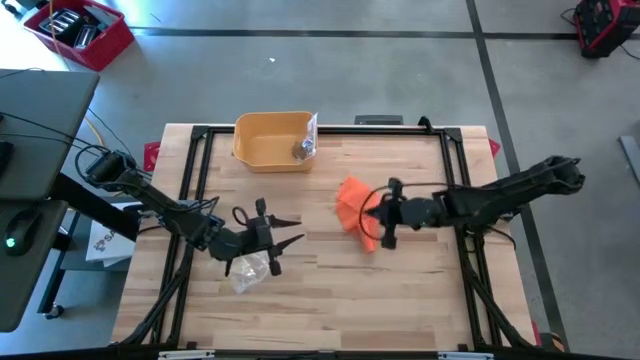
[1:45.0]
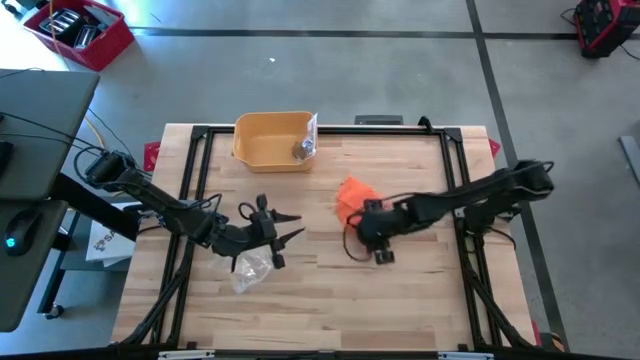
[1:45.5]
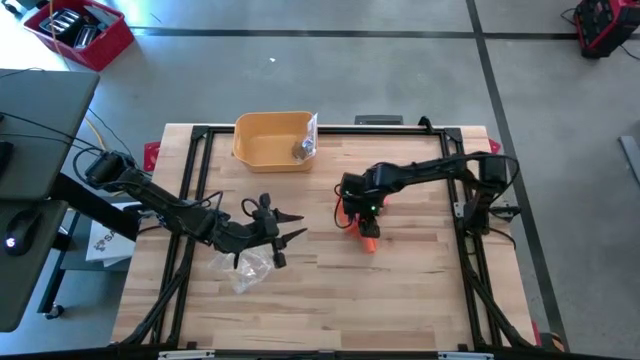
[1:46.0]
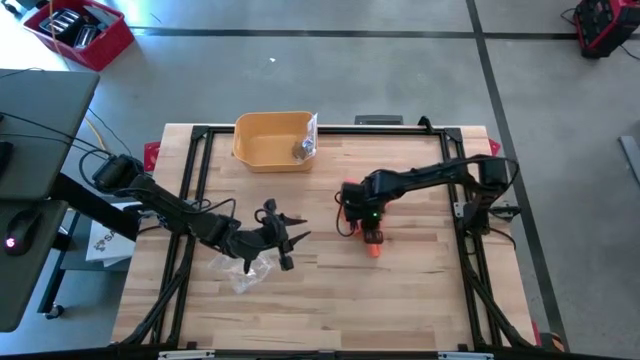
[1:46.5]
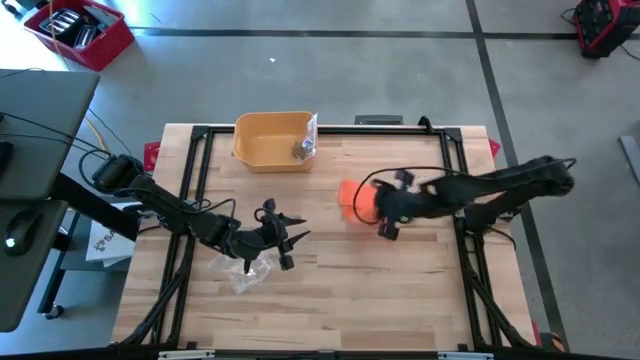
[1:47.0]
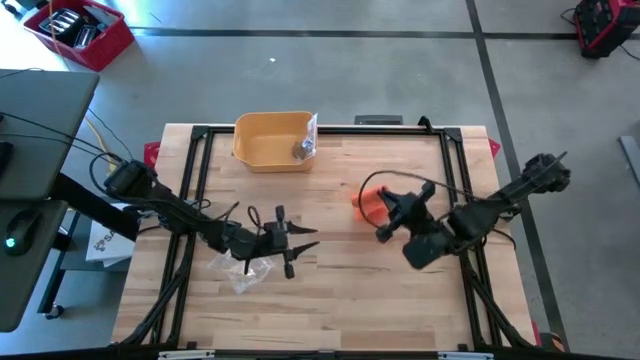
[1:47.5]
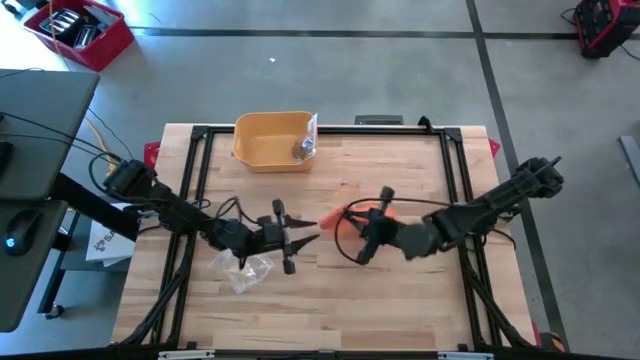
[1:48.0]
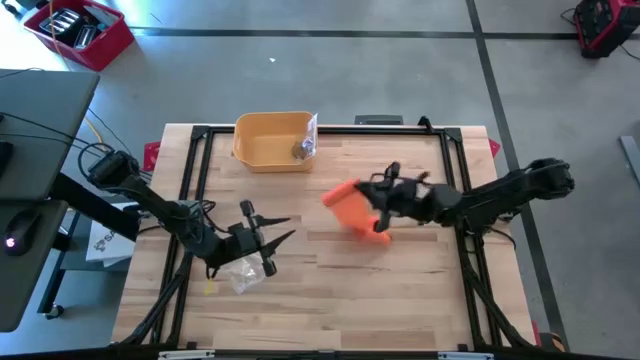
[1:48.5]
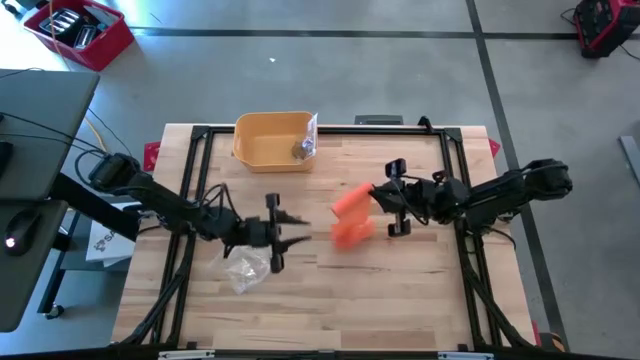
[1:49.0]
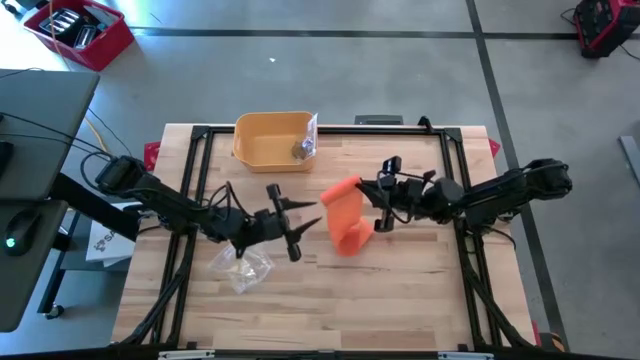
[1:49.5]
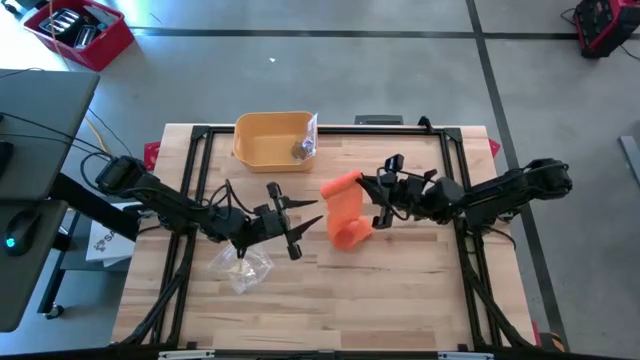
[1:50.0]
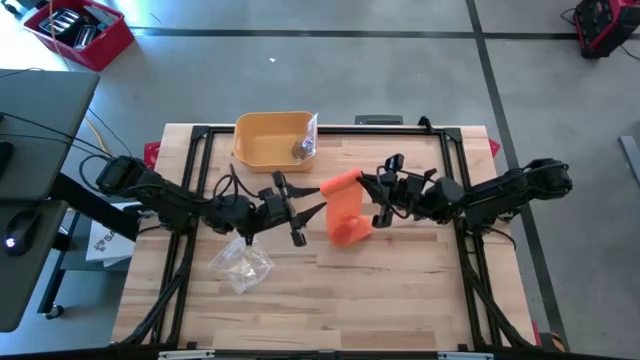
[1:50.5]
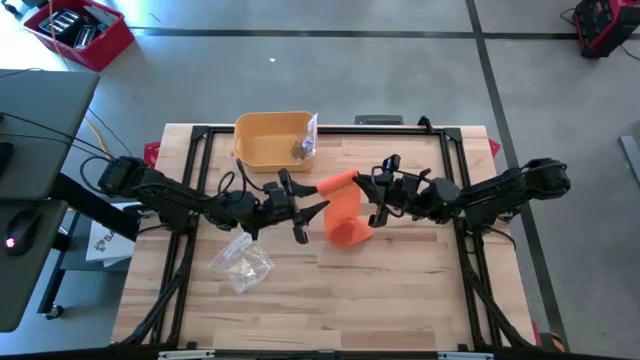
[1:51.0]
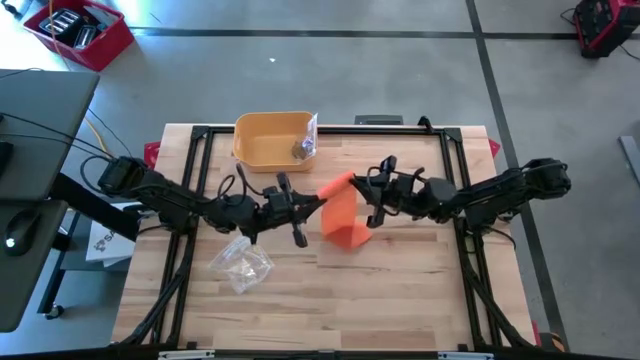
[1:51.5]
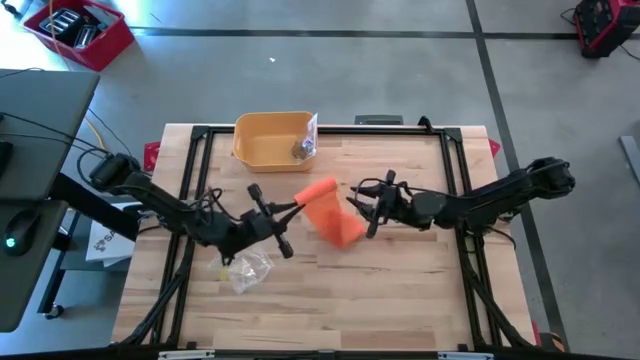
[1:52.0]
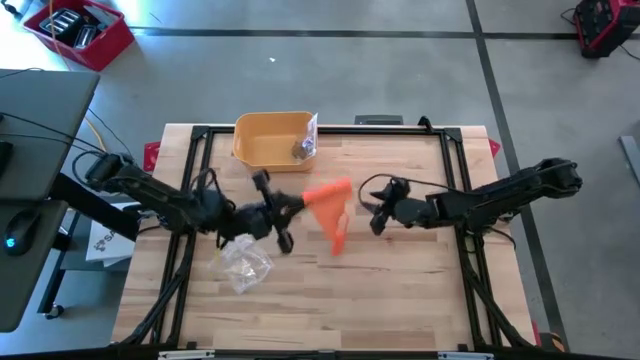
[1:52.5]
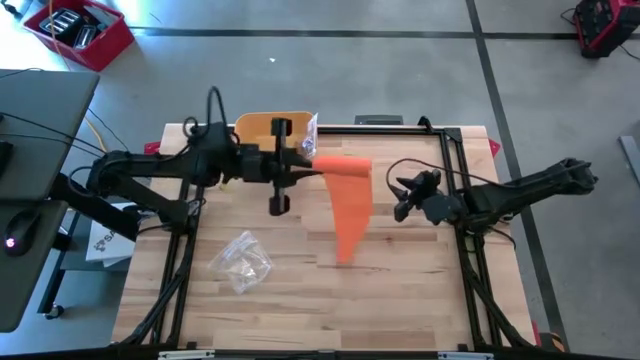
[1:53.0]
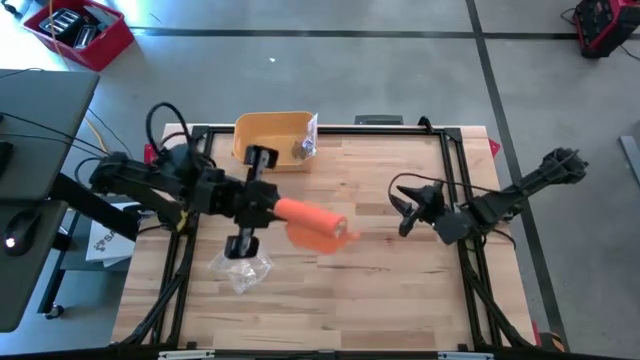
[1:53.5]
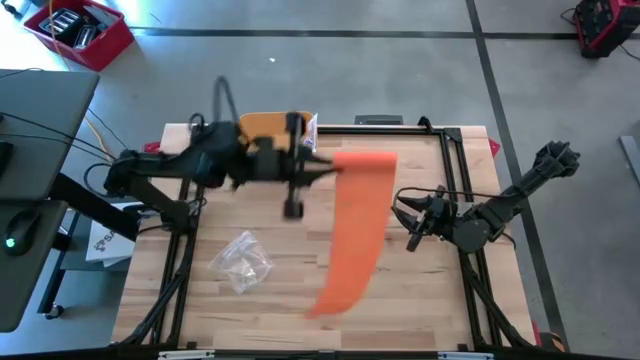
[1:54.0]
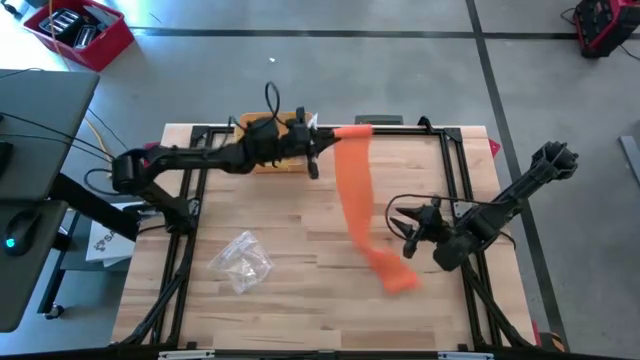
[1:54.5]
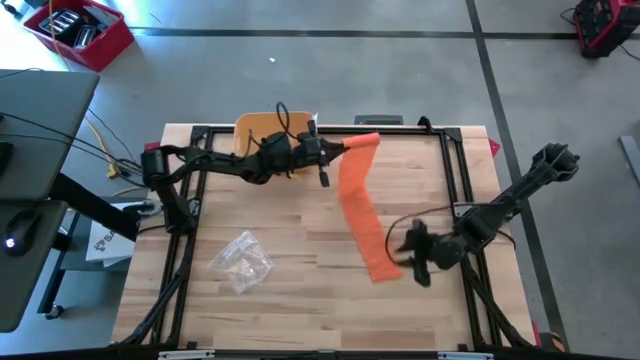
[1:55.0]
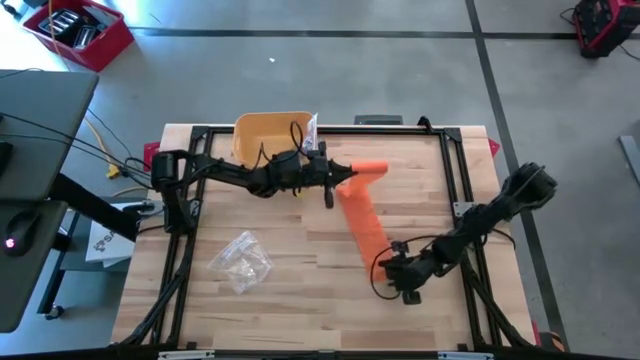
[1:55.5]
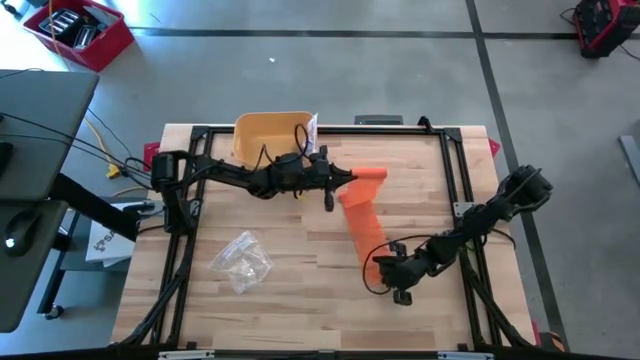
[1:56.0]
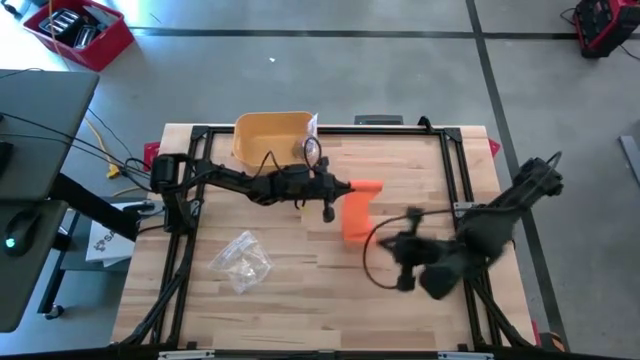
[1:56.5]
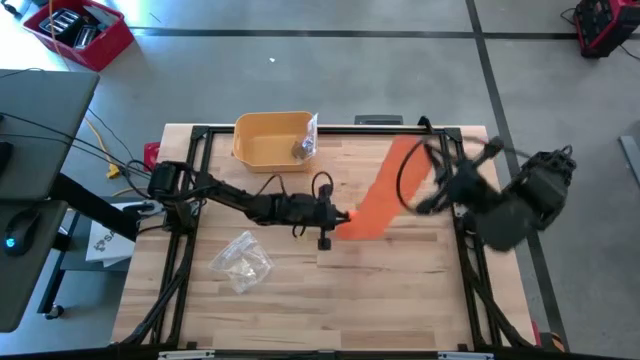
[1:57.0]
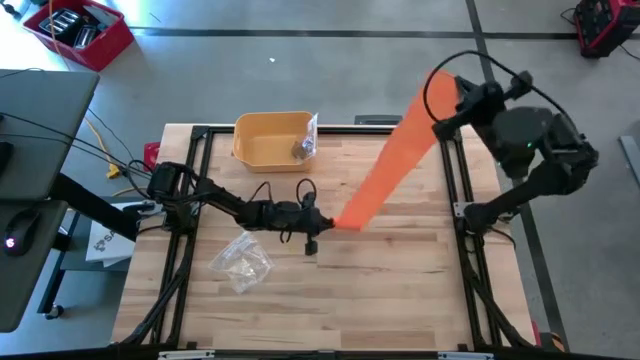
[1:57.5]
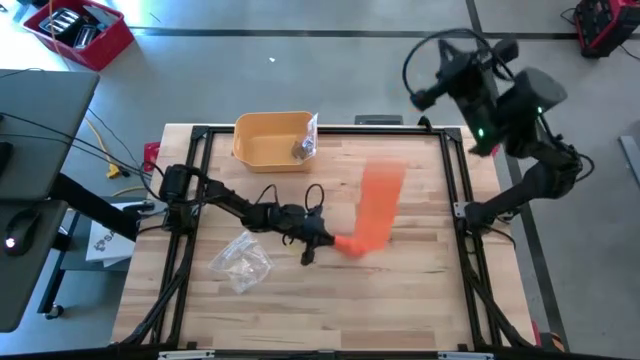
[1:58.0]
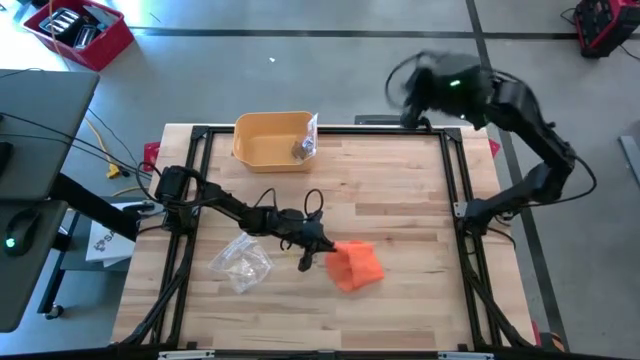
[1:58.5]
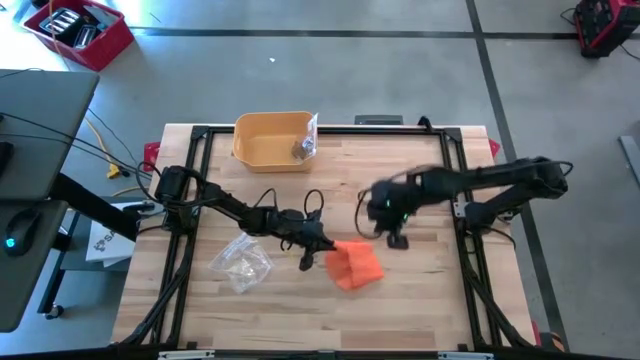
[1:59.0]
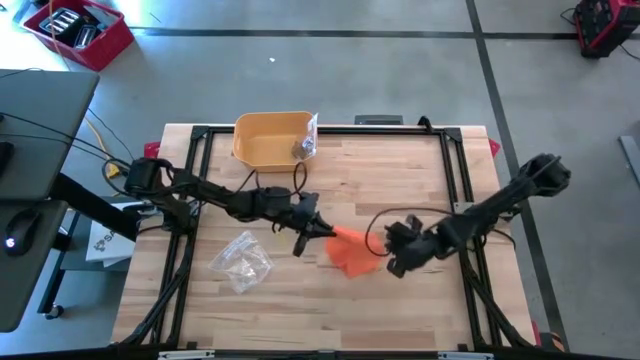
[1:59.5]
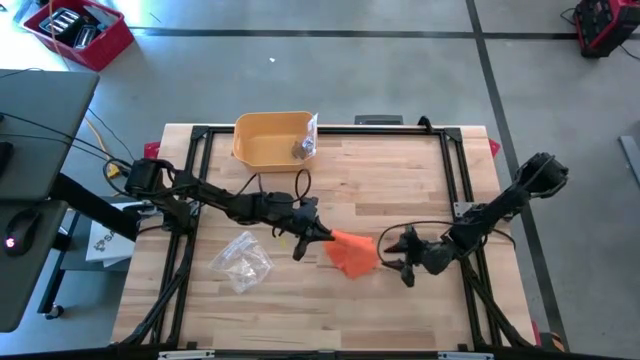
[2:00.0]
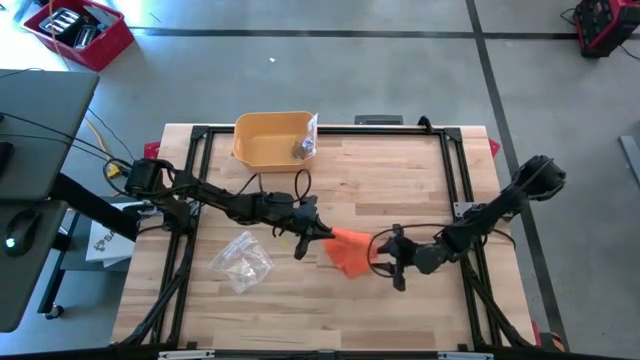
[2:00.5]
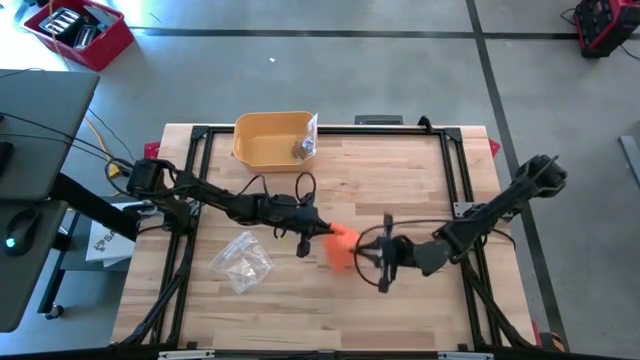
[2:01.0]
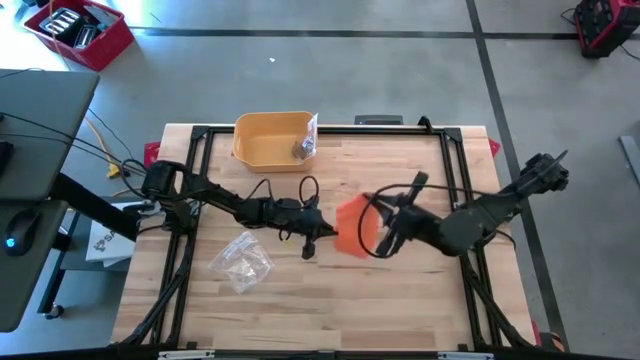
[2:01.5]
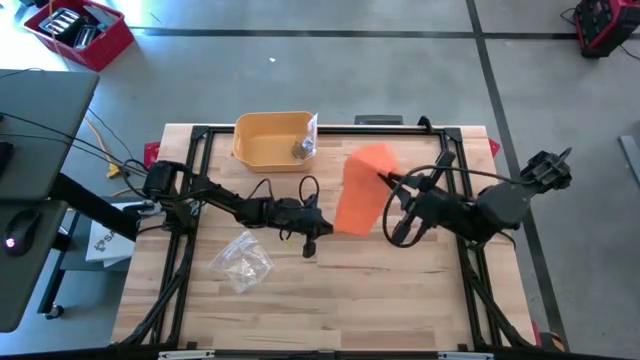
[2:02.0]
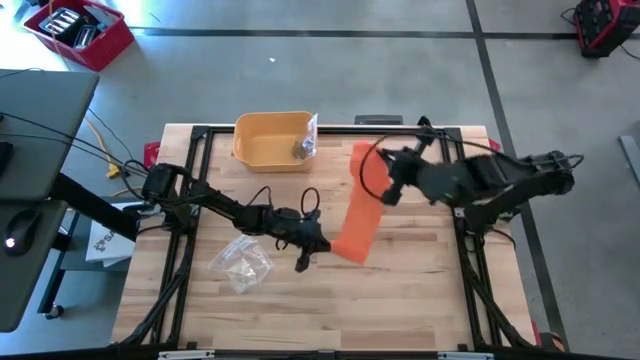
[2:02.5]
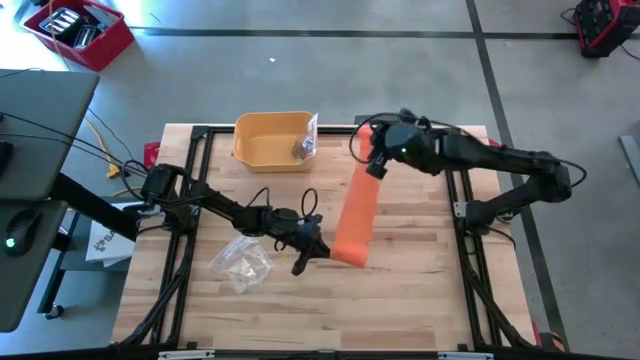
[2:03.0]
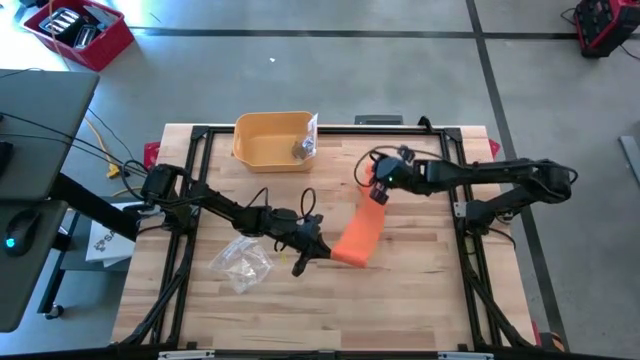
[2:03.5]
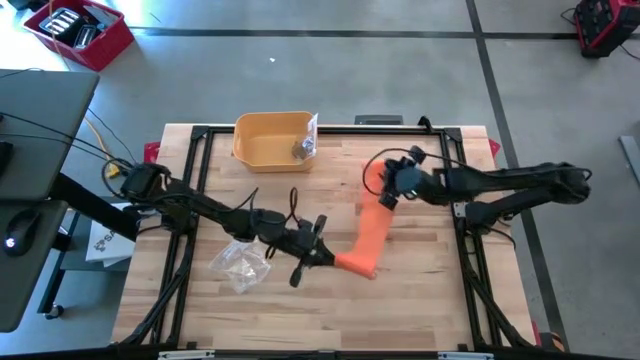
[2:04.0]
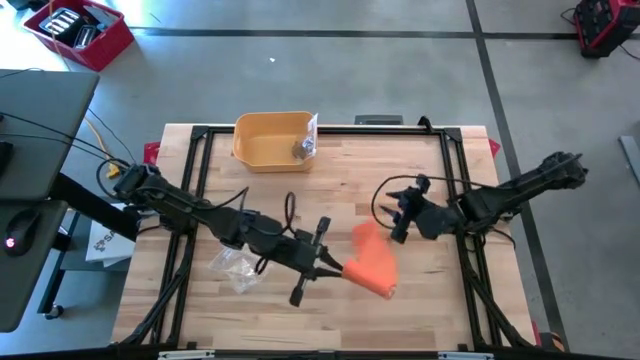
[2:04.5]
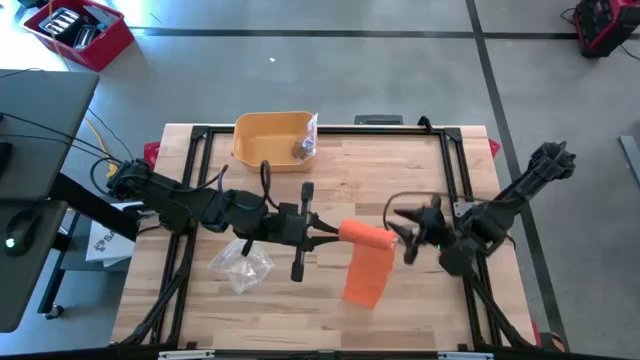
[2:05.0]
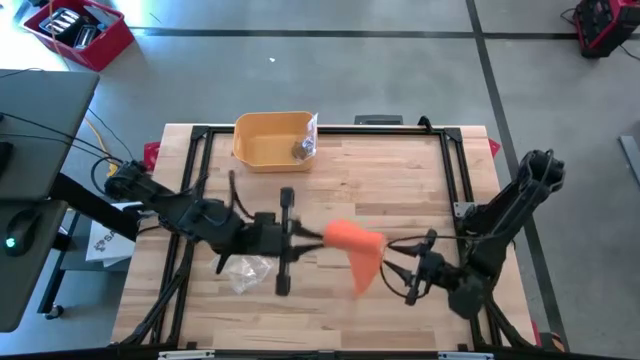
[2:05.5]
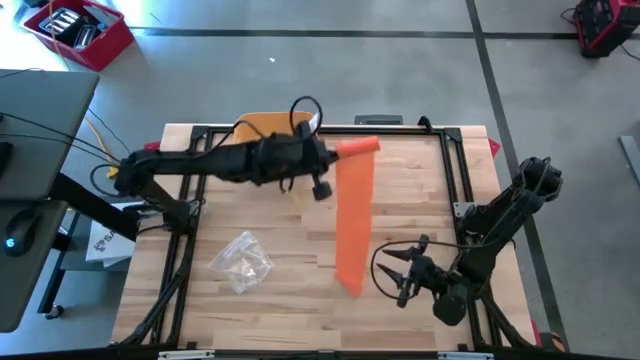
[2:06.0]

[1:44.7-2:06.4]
Task: Roll bandage
Roll the orange bandage
